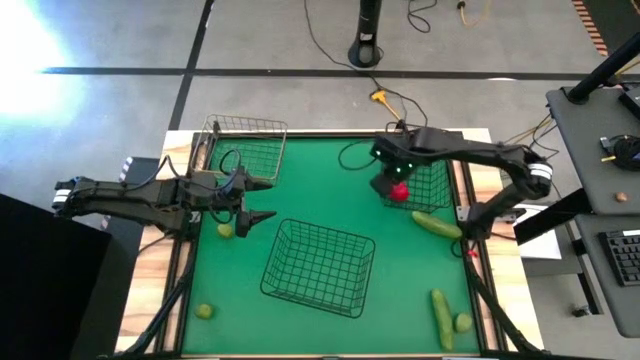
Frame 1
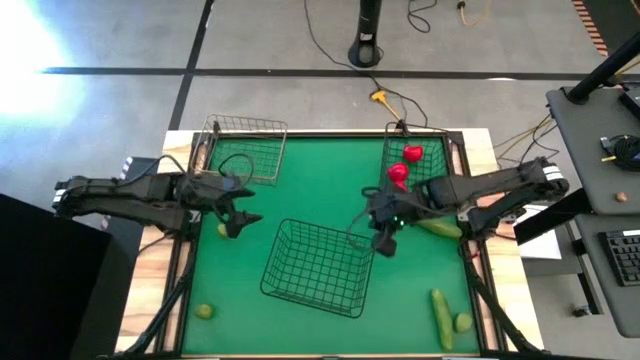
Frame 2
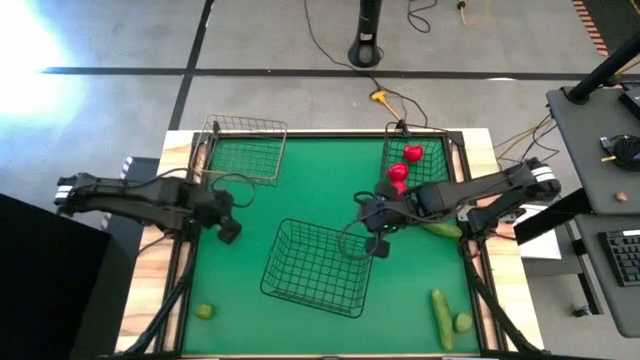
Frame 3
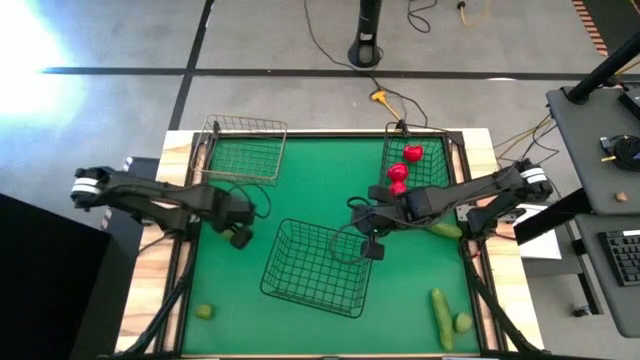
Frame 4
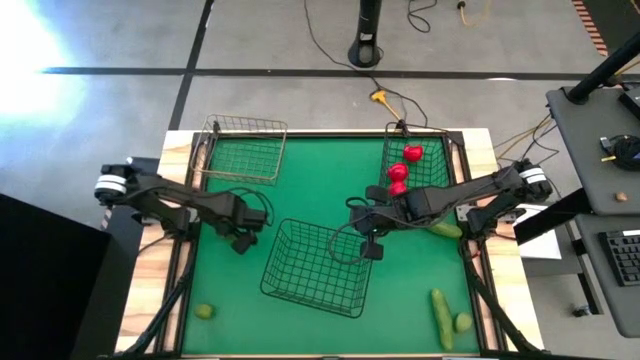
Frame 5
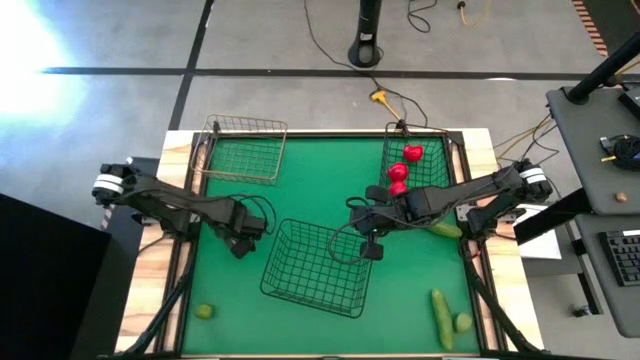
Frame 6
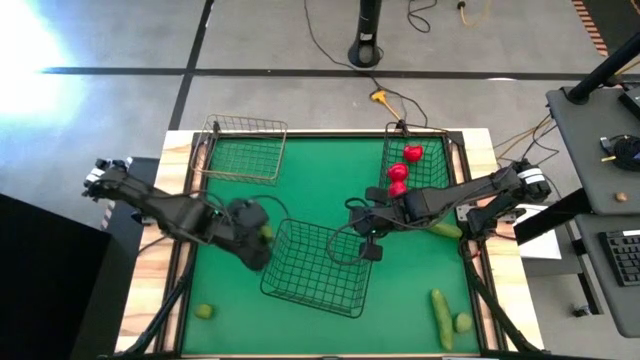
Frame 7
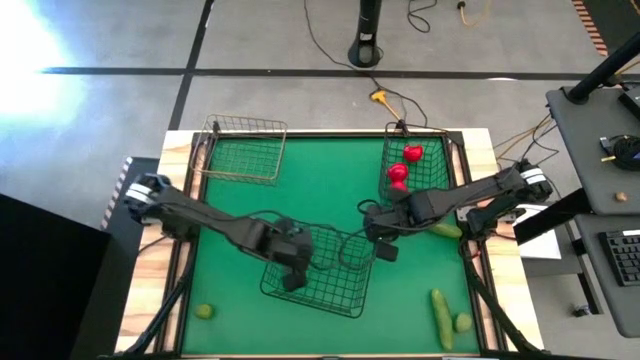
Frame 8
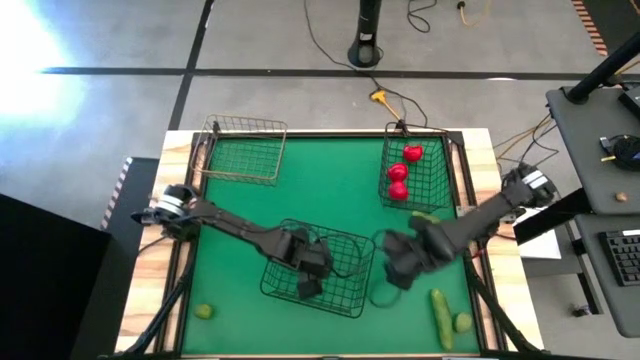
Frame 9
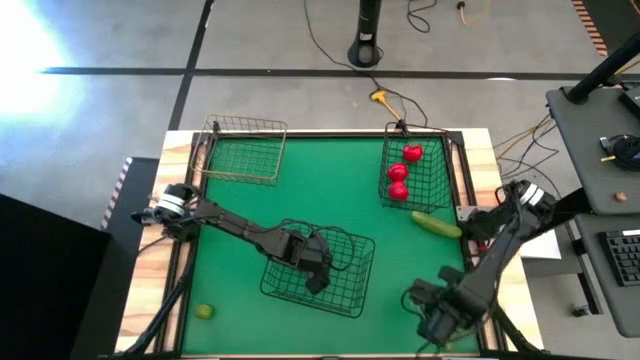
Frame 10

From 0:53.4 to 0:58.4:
Task: Sort produce into baskets
Put the top lime into the bottom black wire basket

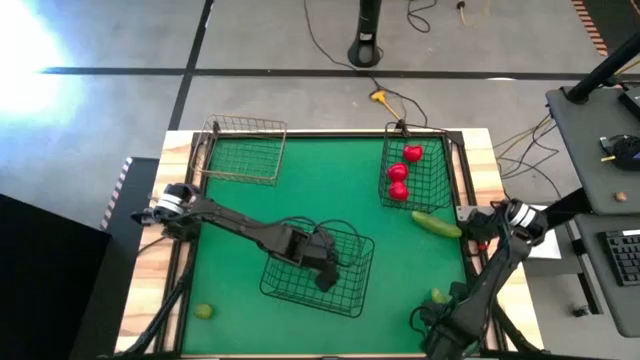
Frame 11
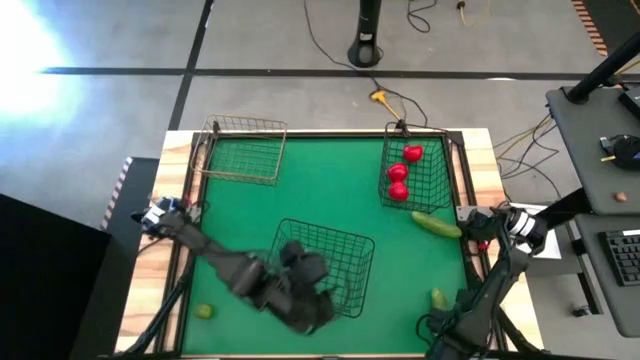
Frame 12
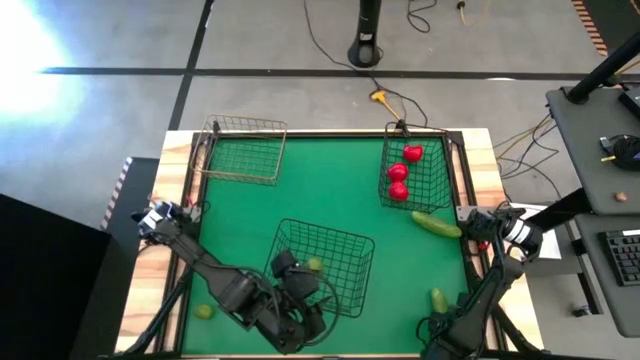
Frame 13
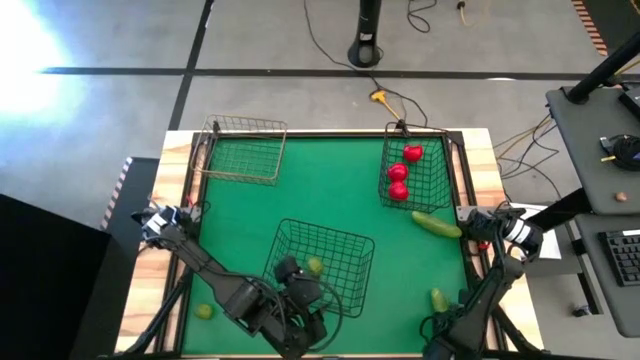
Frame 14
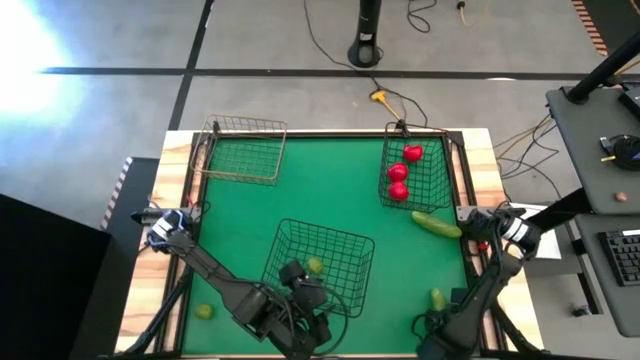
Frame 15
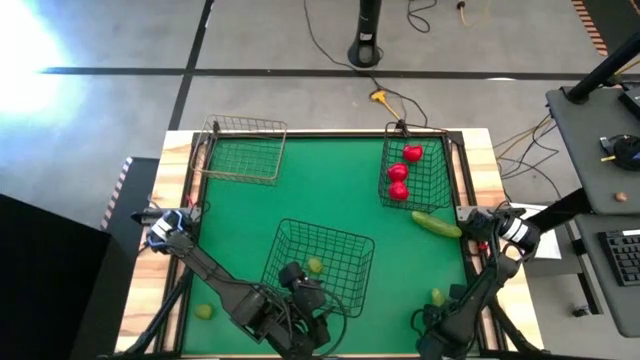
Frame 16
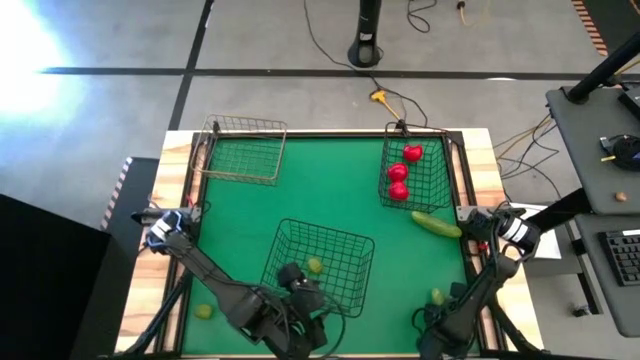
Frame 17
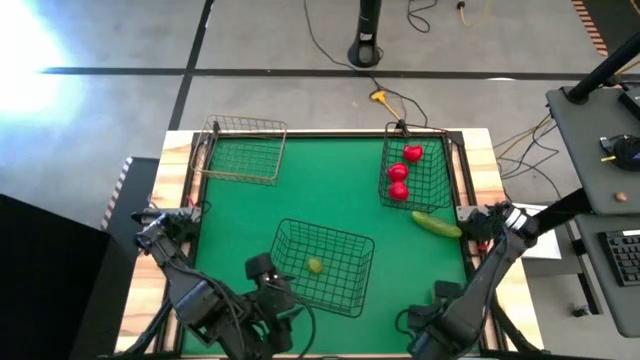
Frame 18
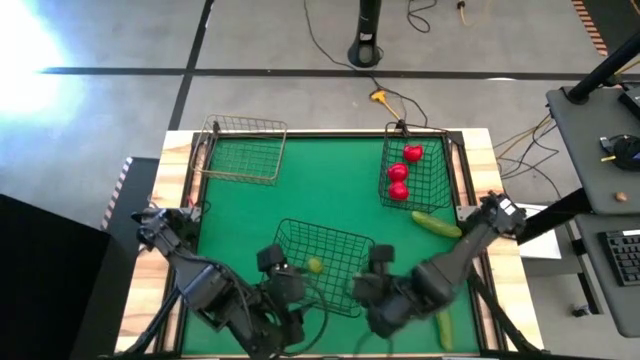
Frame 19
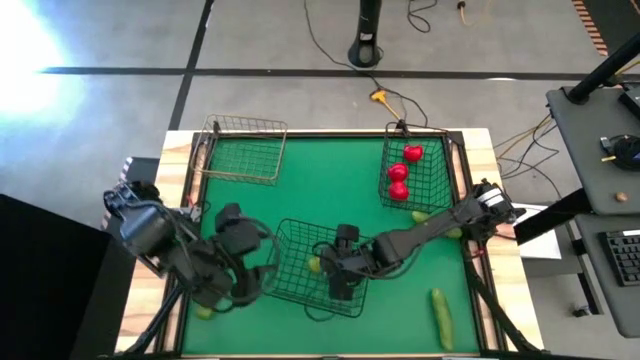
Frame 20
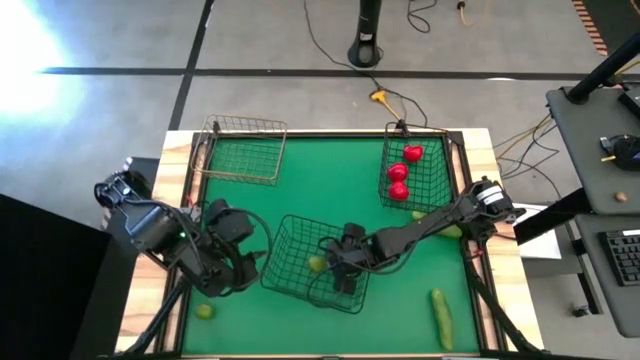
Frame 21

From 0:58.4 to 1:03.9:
Put the right lime into the bottom black wire basket

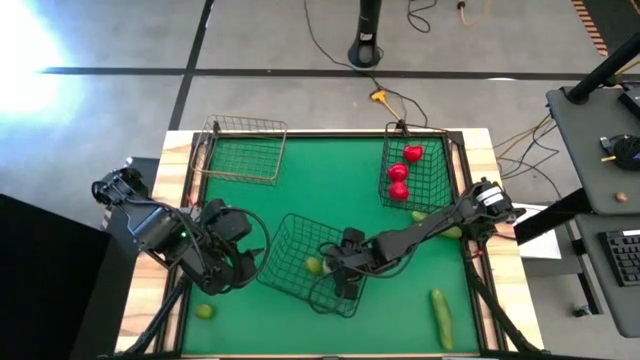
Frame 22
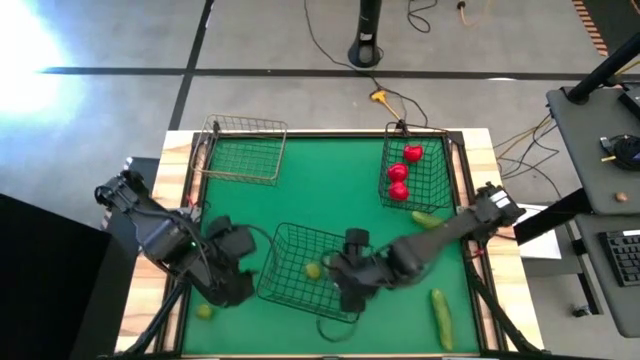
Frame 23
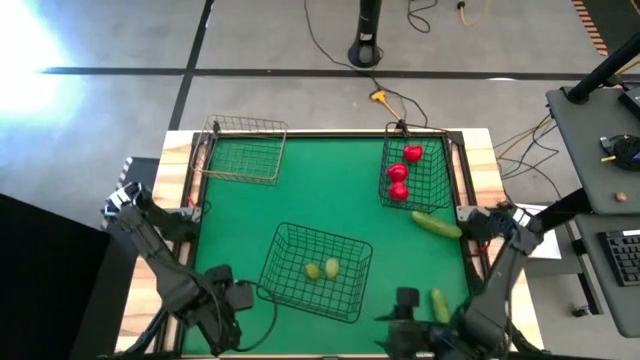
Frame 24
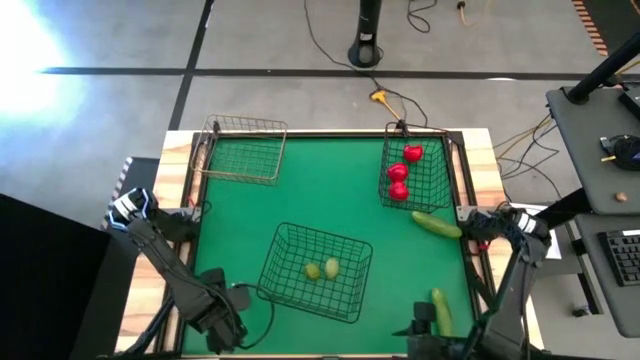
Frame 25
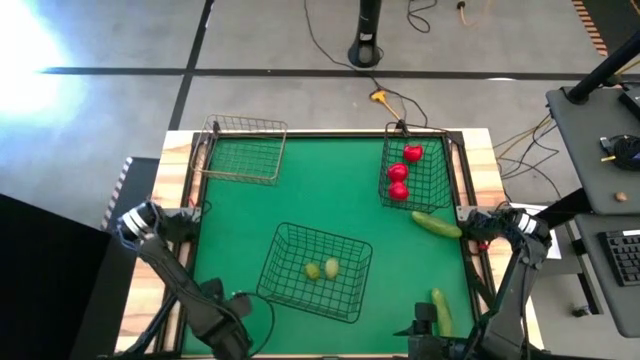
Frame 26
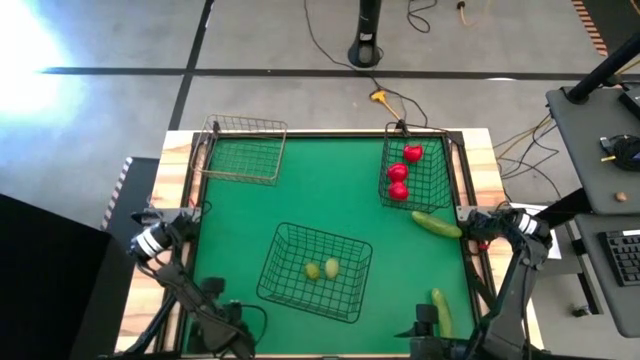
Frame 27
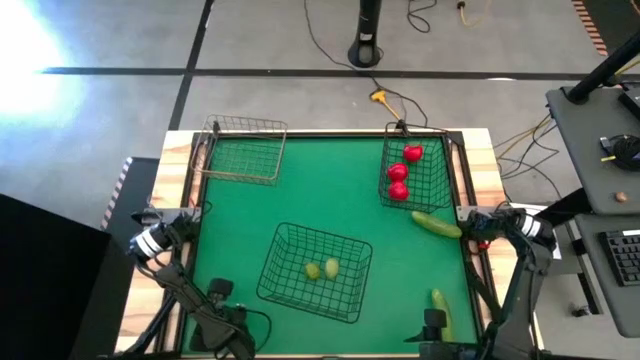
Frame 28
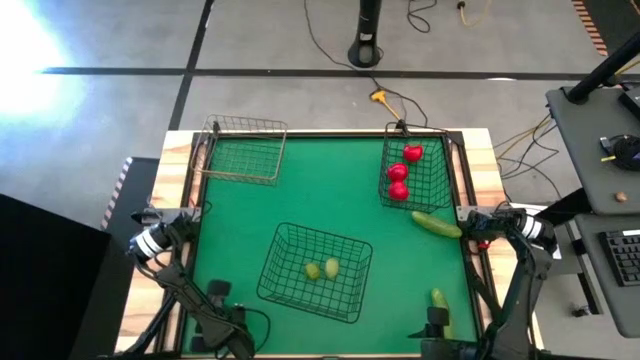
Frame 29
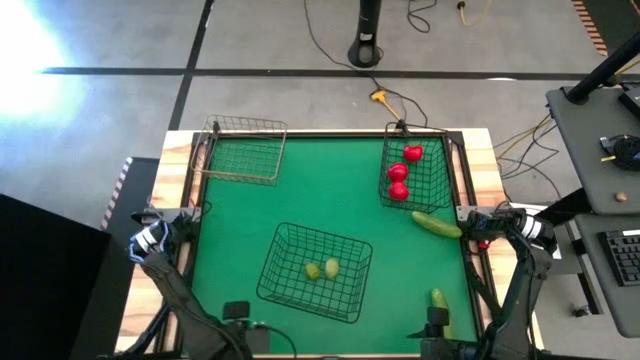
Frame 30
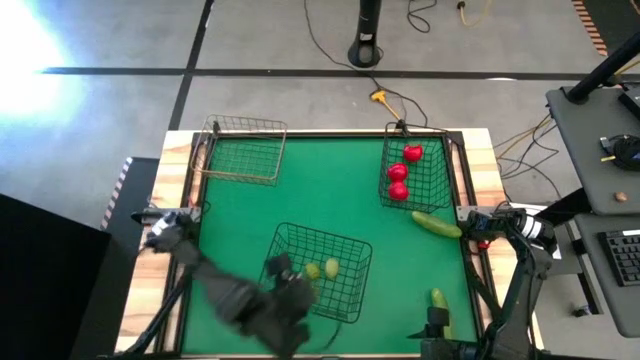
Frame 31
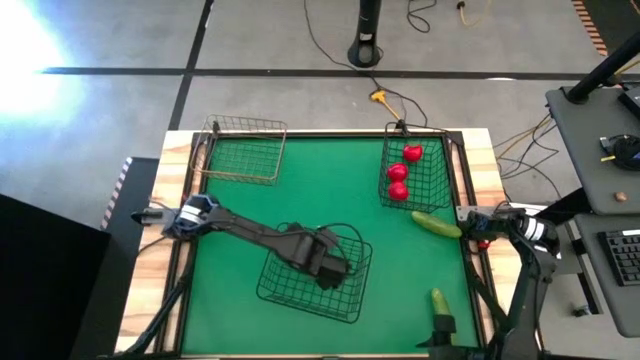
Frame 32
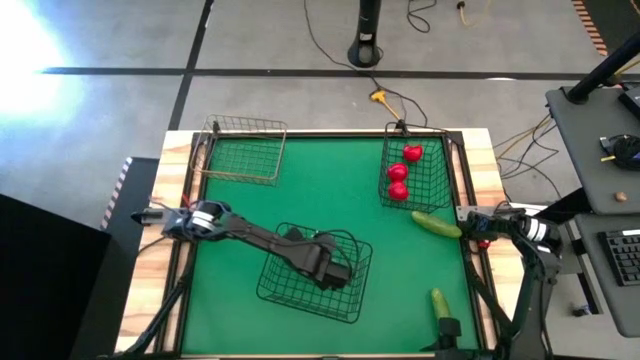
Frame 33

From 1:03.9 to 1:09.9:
Put the lime into the bottom black wire basket

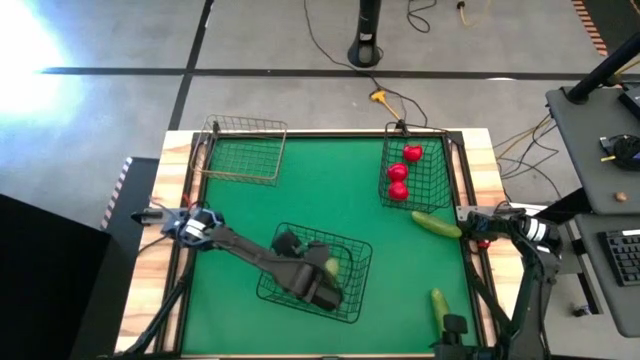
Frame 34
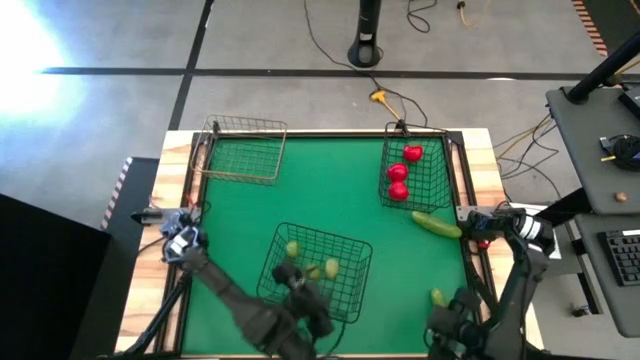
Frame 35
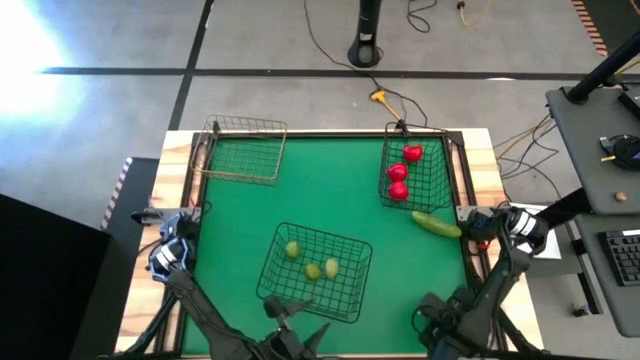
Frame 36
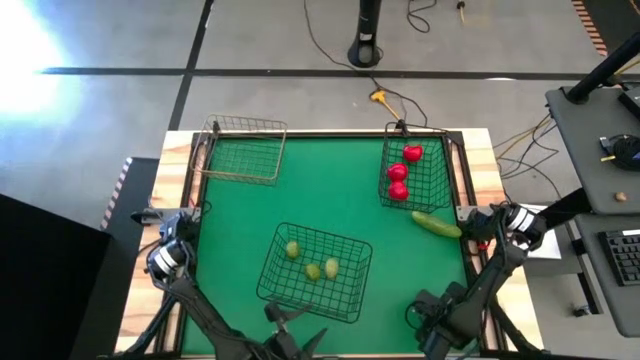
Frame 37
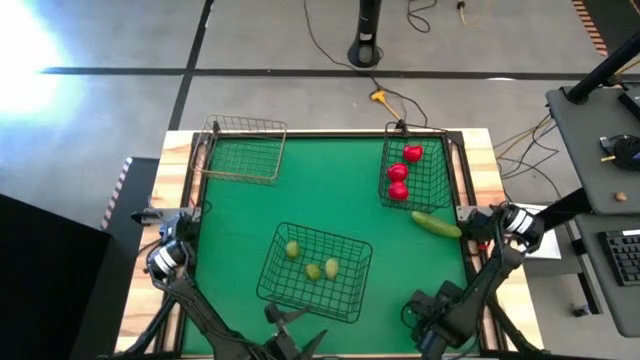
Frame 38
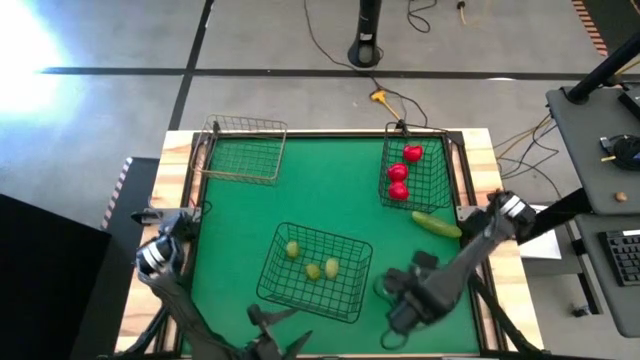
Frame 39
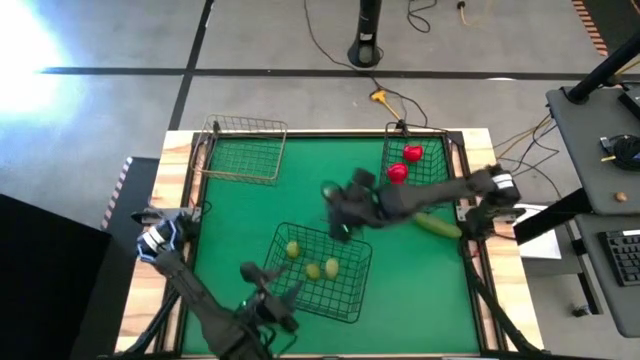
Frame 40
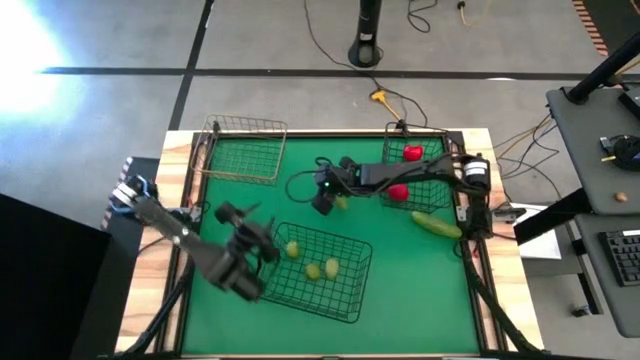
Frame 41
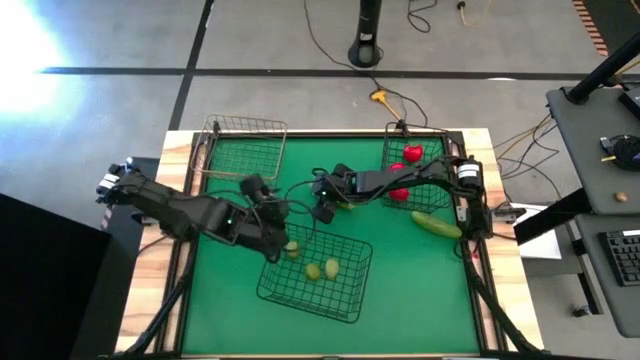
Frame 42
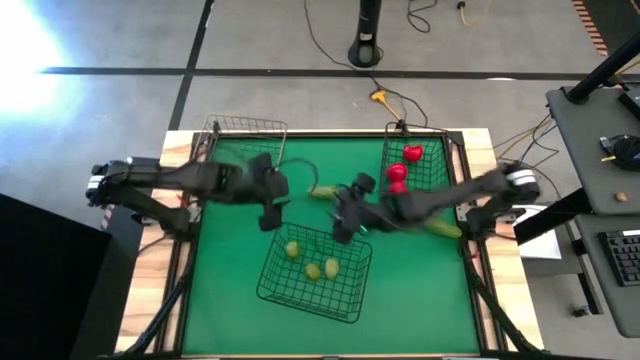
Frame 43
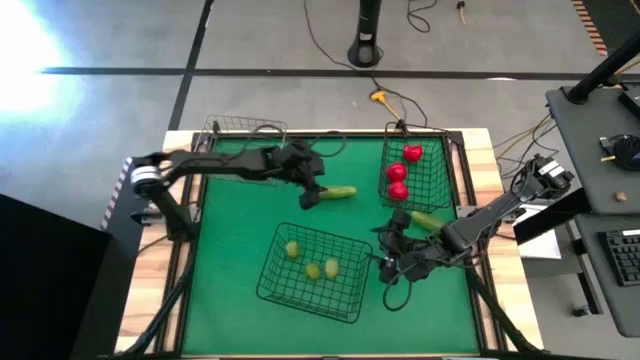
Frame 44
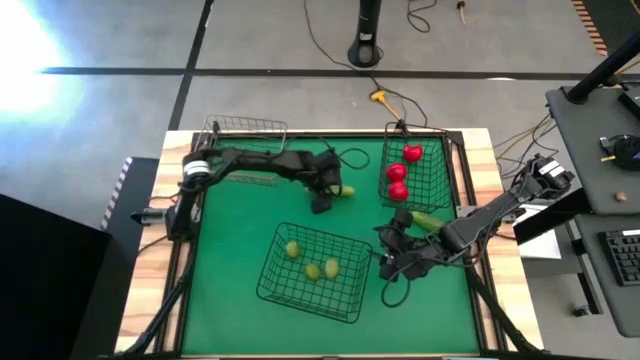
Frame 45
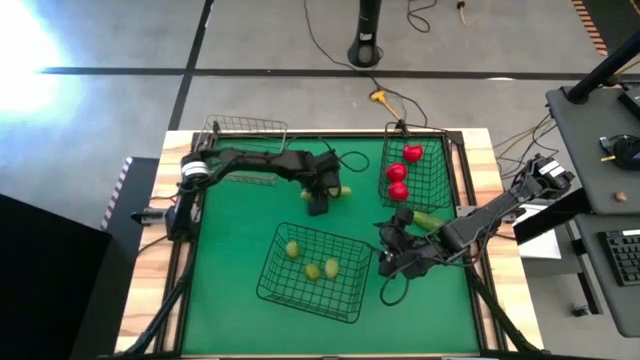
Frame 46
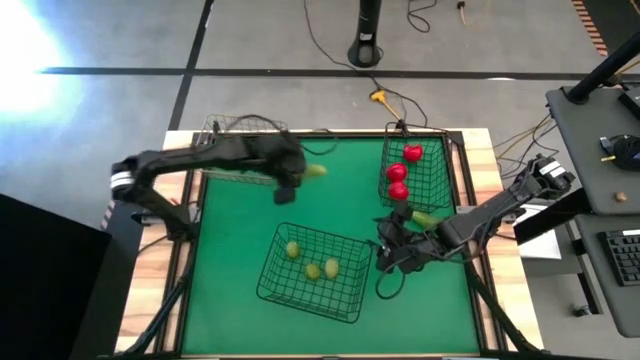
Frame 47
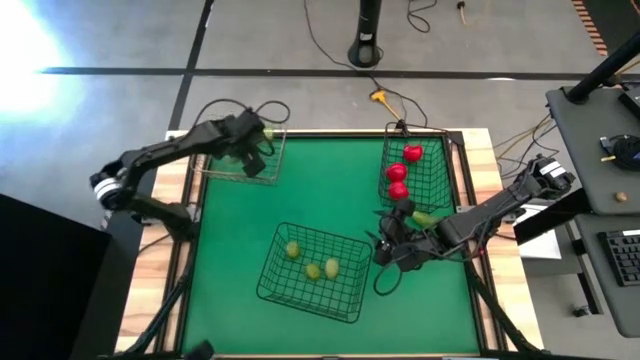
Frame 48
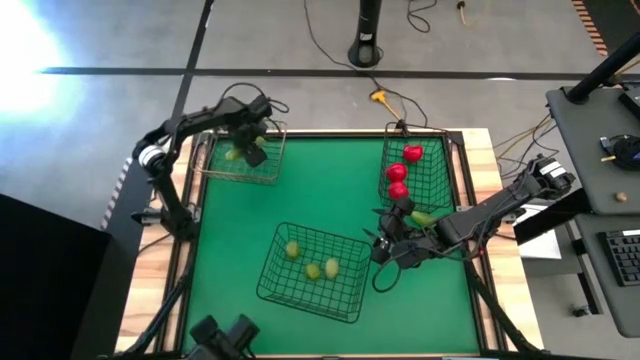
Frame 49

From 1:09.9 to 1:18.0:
Put the bottom cucumber into the silver wire basket
